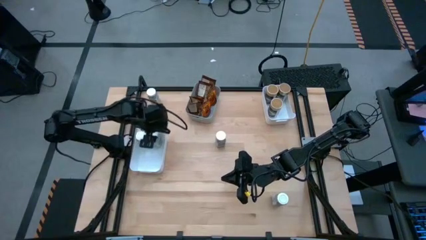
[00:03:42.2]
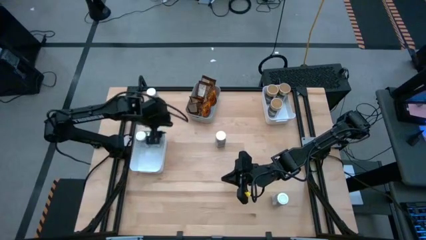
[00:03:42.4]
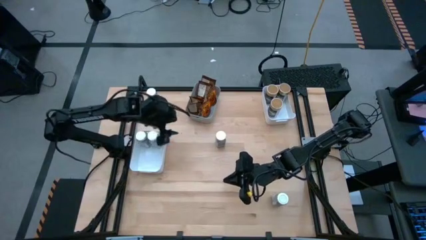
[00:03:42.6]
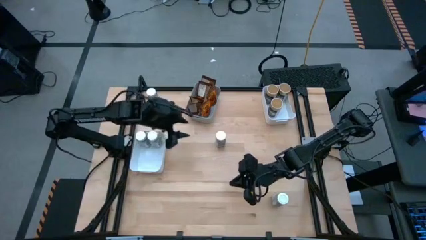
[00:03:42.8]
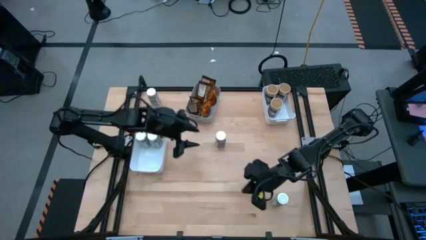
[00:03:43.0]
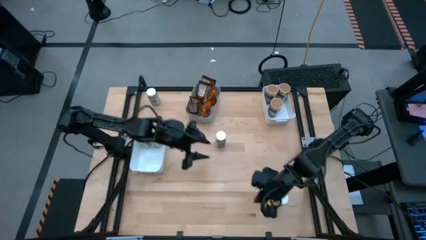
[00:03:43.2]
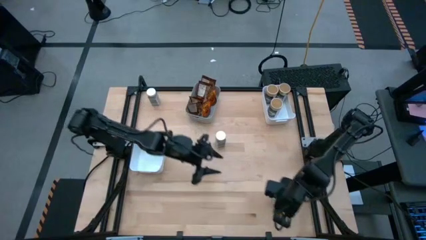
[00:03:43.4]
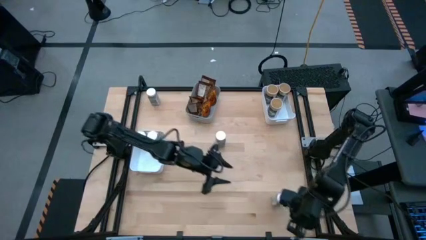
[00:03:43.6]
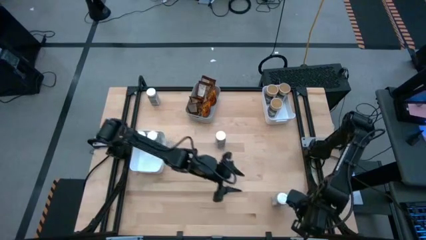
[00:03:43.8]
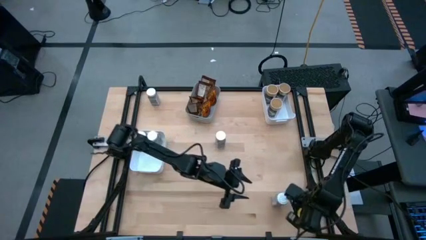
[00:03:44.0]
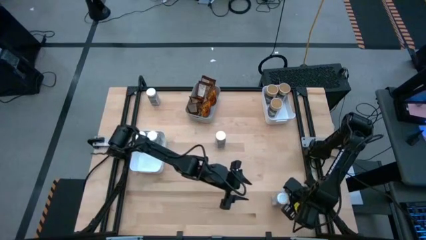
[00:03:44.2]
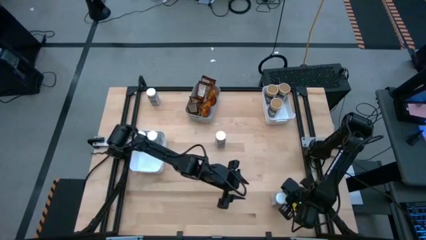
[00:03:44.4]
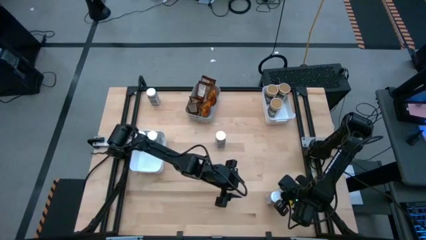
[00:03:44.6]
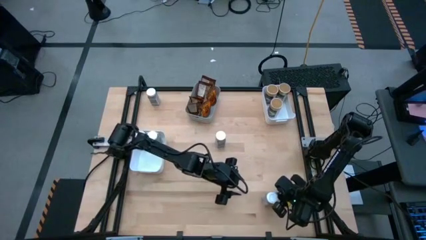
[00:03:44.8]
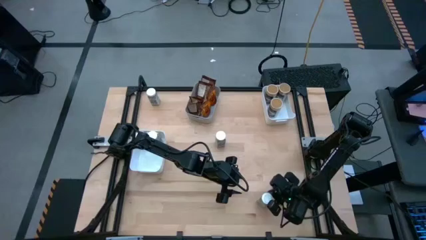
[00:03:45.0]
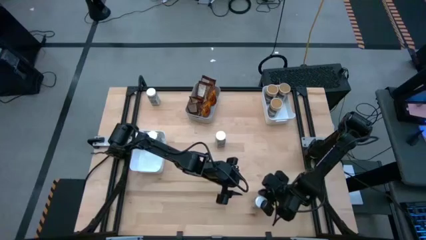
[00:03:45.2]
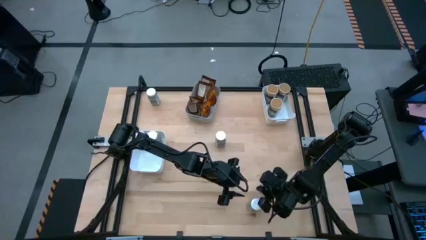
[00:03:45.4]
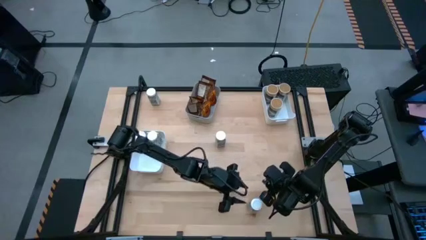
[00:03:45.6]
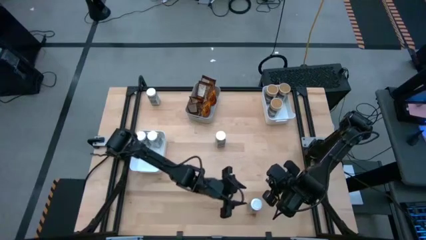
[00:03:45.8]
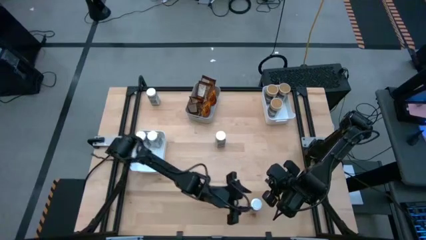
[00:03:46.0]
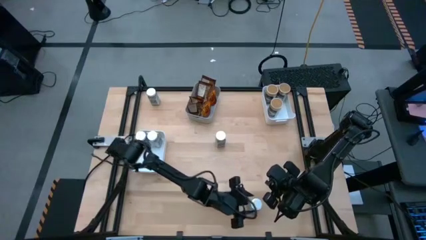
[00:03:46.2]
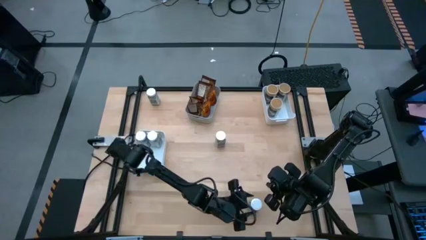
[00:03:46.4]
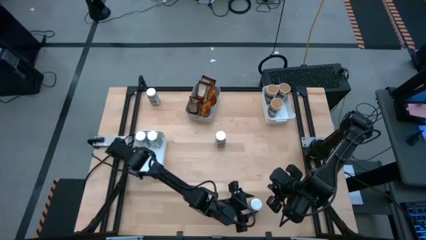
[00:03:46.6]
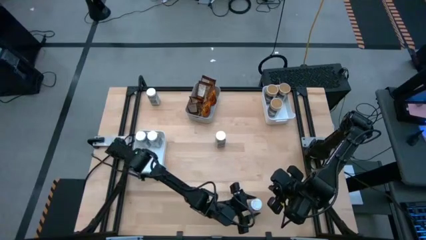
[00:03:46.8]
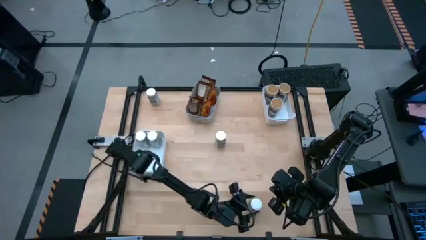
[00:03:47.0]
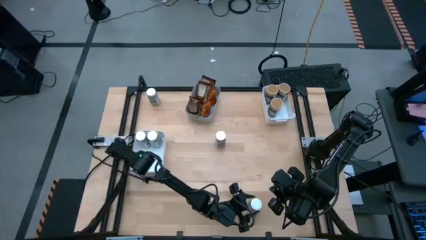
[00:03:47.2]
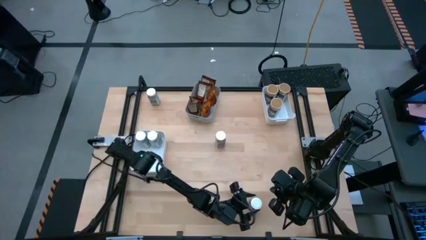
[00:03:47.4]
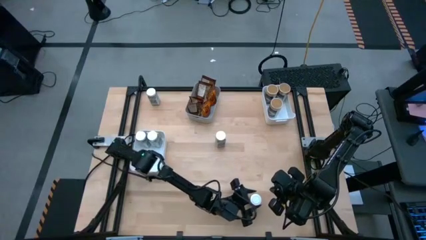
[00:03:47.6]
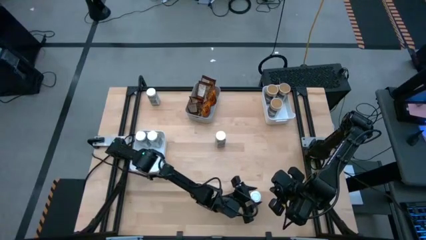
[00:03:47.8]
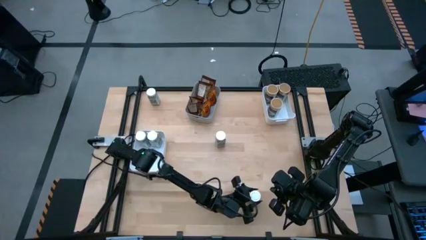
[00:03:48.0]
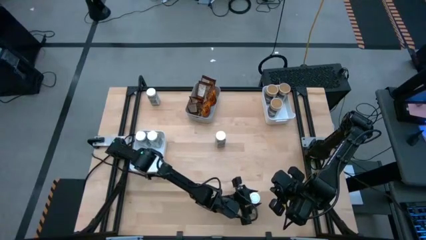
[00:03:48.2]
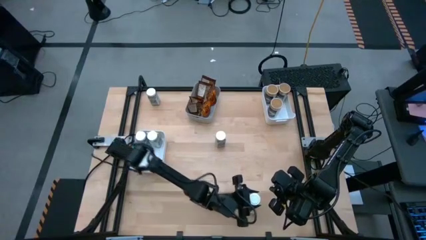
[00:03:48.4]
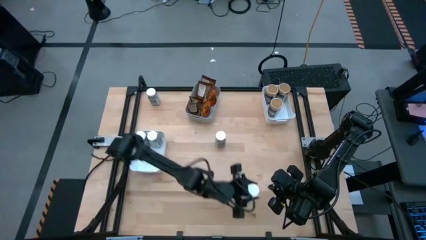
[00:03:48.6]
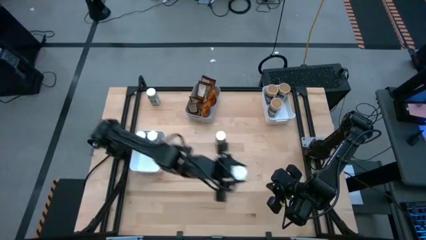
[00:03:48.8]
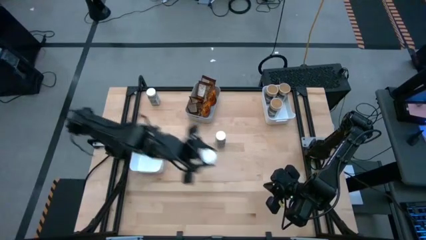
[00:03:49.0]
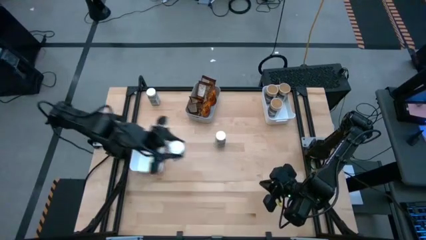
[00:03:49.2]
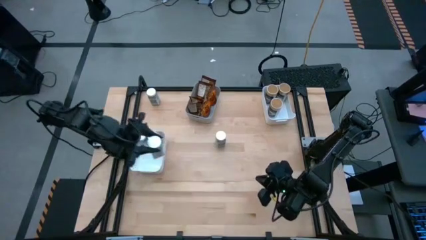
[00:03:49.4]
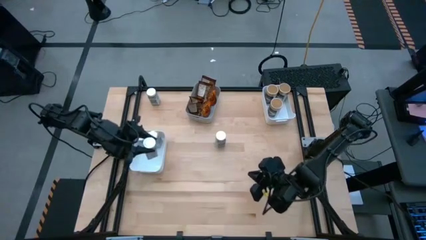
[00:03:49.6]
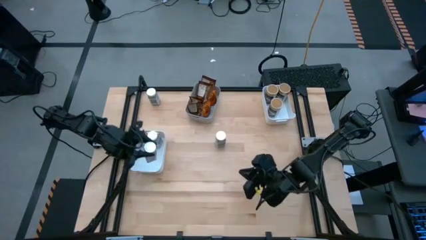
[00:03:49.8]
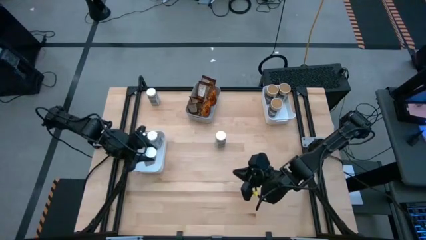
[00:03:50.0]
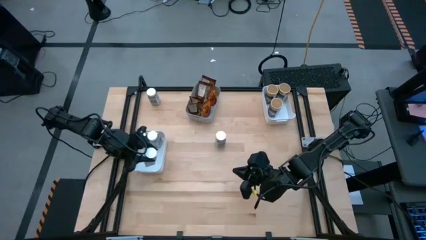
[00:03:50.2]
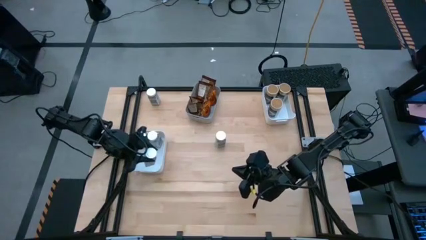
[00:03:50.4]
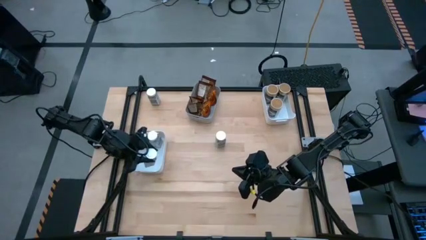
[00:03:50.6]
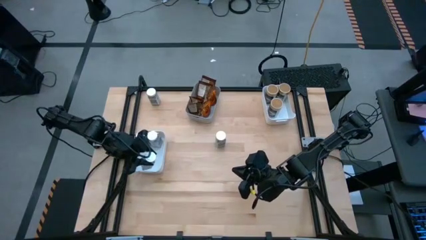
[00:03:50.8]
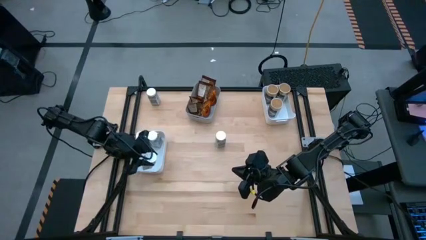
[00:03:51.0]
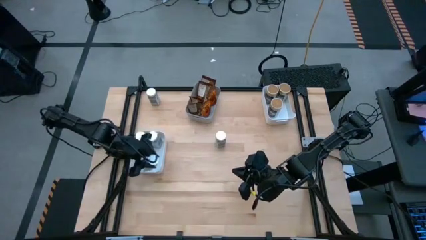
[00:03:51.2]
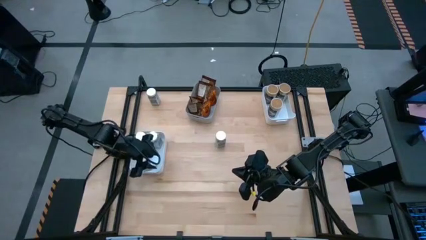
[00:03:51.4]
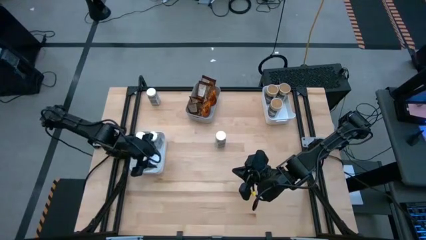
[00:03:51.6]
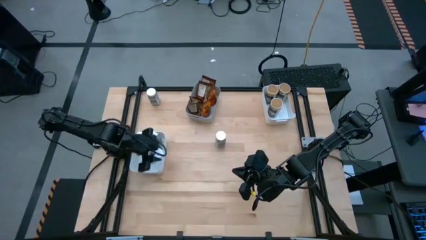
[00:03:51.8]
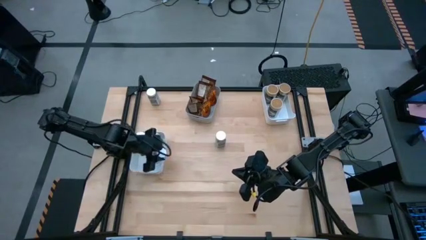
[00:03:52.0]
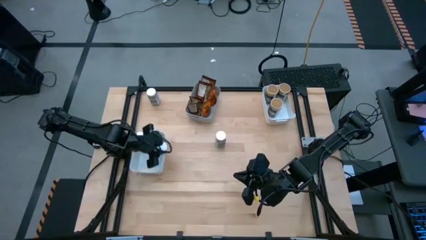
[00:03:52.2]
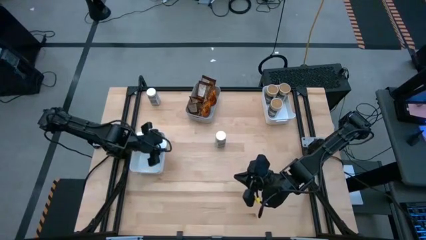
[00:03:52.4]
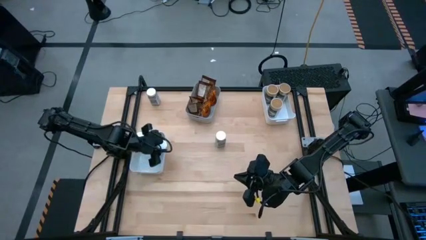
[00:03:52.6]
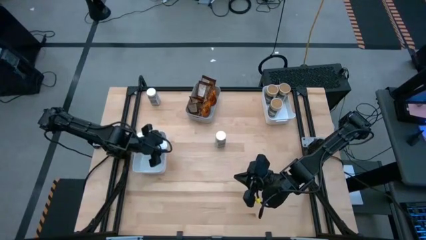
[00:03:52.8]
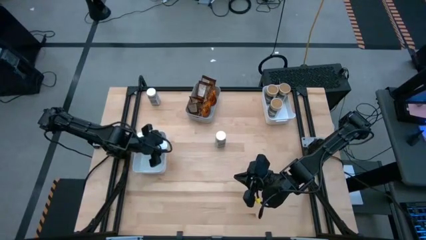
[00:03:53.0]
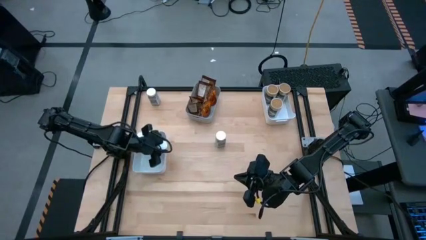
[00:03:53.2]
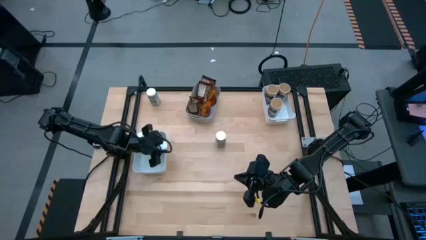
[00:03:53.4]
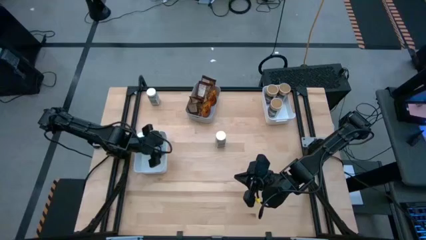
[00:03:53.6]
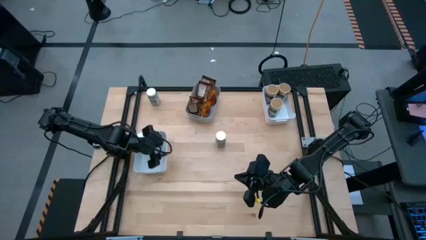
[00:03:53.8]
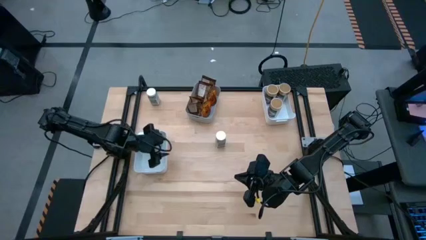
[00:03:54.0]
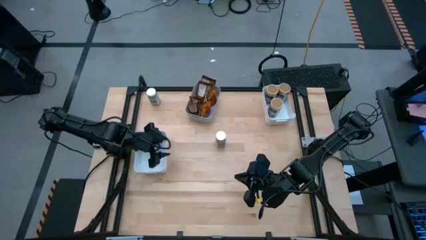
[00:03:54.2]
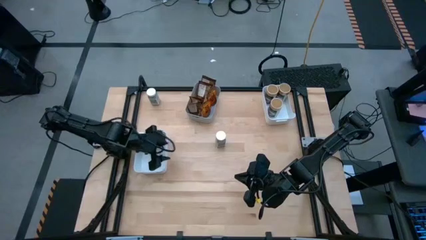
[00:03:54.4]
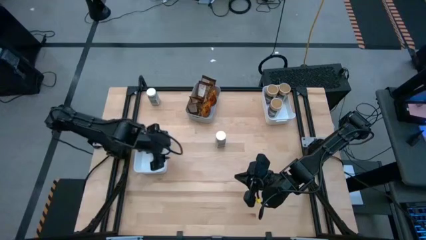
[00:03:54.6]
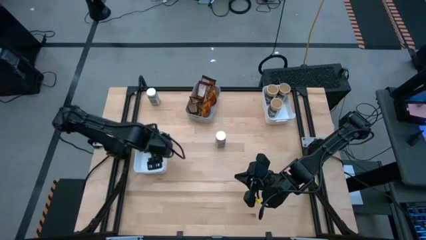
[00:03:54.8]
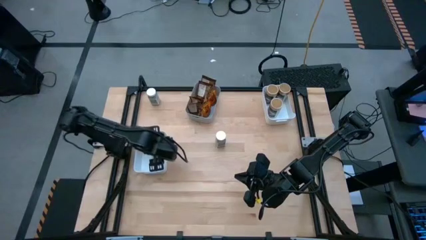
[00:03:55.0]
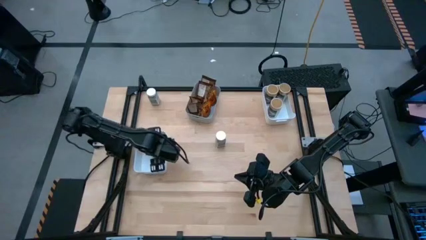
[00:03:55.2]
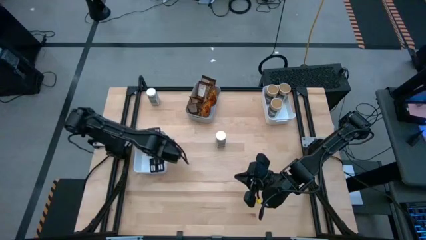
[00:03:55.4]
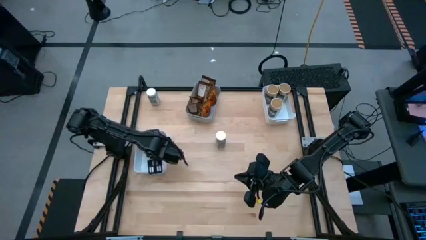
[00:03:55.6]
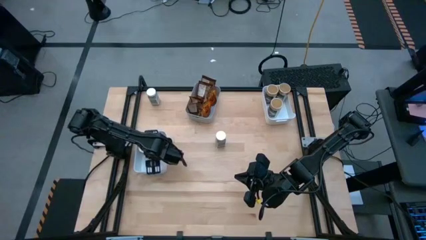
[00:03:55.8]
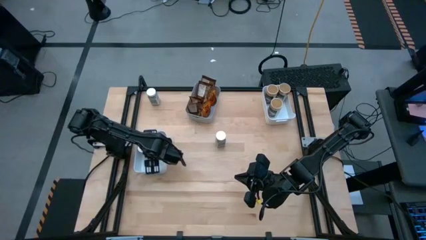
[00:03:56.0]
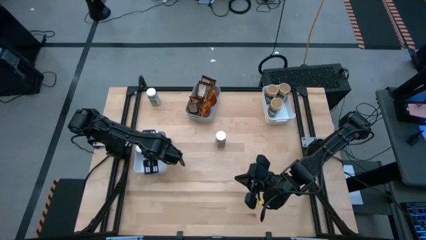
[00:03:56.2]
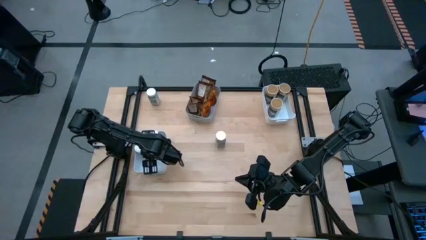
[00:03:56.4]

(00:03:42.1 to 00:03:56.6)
Task: Sort spices by type
Put the white spice bottle into the bottom white bin
